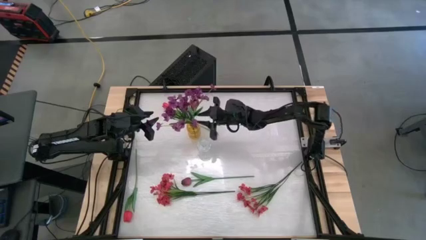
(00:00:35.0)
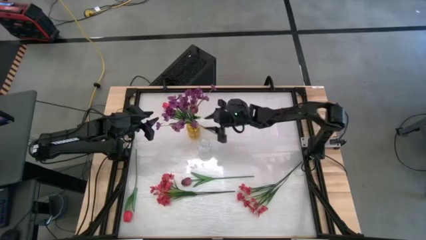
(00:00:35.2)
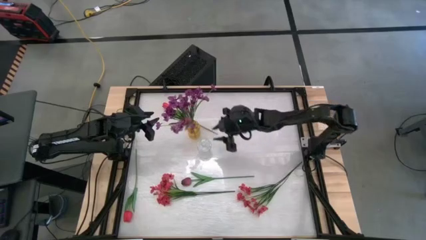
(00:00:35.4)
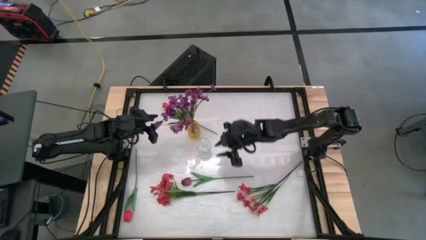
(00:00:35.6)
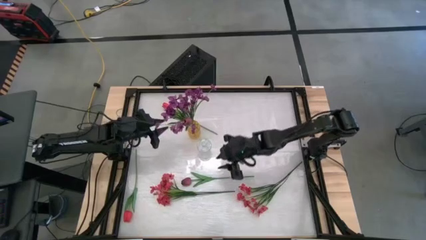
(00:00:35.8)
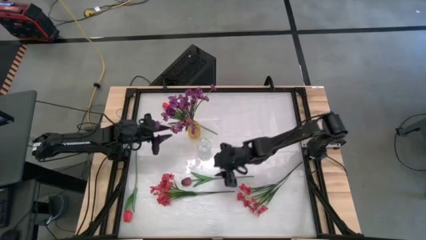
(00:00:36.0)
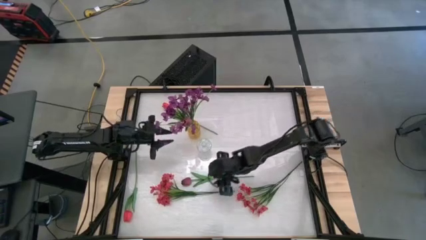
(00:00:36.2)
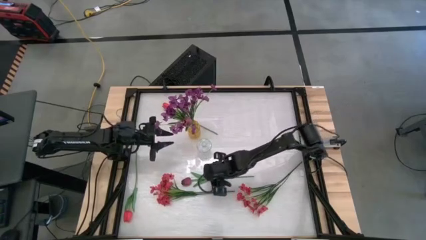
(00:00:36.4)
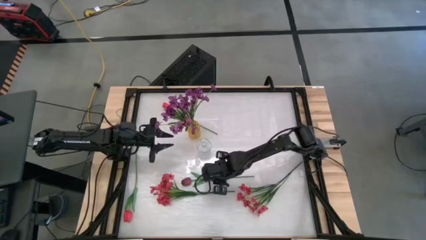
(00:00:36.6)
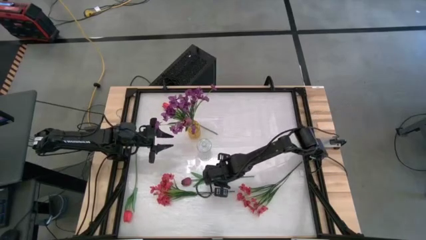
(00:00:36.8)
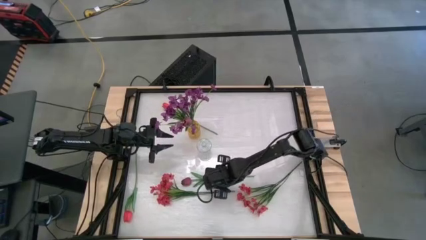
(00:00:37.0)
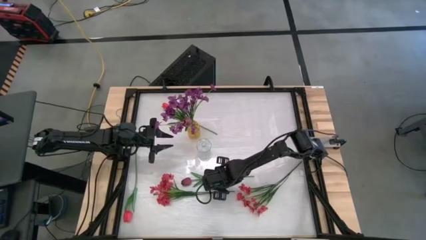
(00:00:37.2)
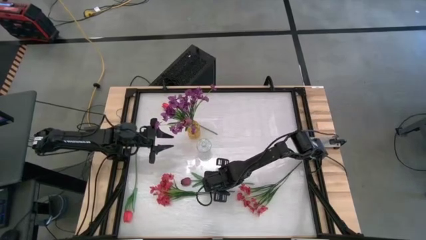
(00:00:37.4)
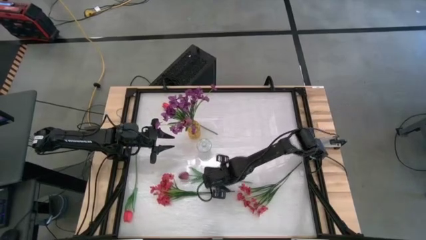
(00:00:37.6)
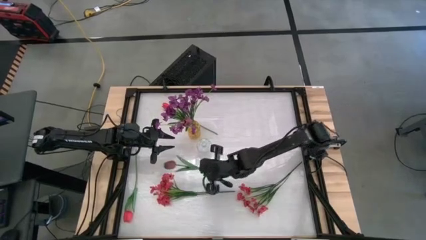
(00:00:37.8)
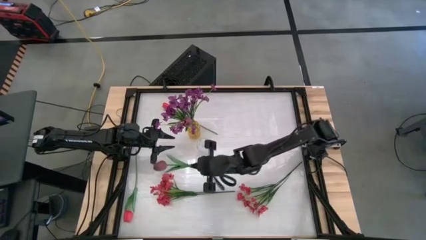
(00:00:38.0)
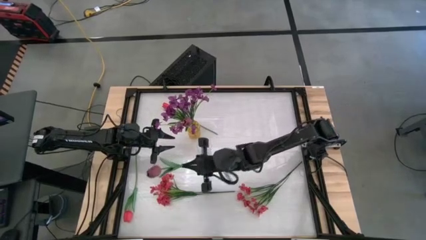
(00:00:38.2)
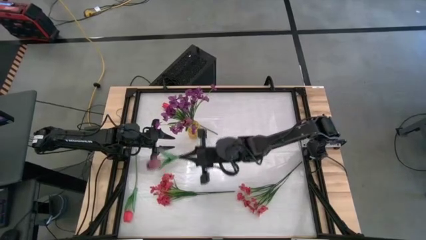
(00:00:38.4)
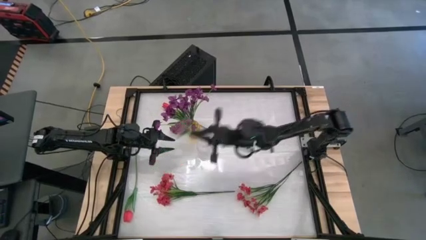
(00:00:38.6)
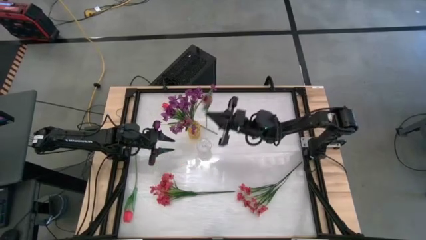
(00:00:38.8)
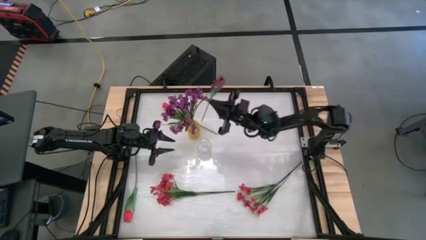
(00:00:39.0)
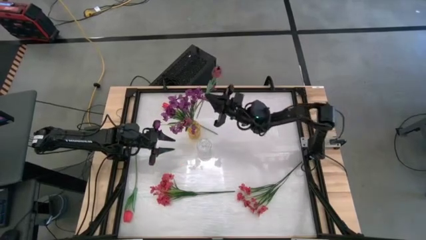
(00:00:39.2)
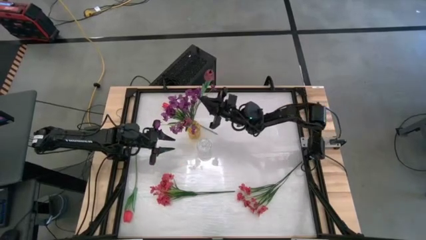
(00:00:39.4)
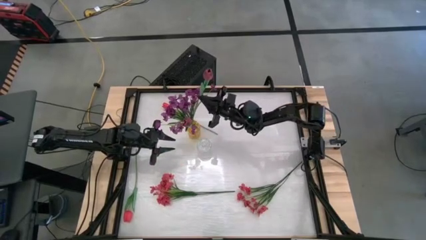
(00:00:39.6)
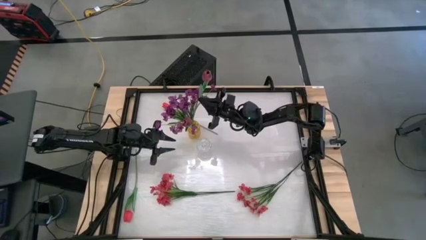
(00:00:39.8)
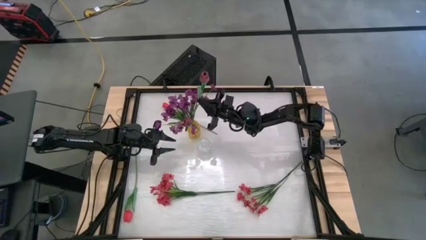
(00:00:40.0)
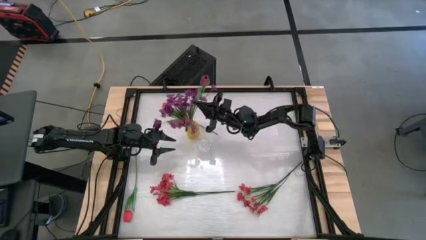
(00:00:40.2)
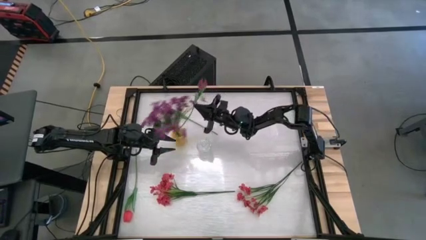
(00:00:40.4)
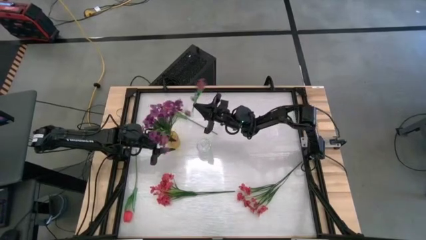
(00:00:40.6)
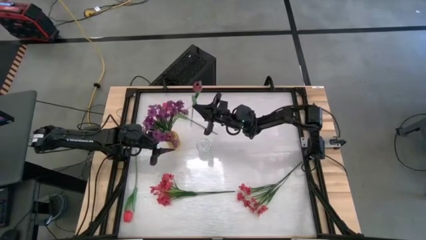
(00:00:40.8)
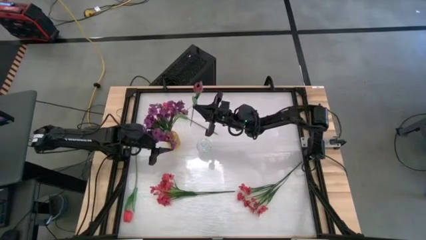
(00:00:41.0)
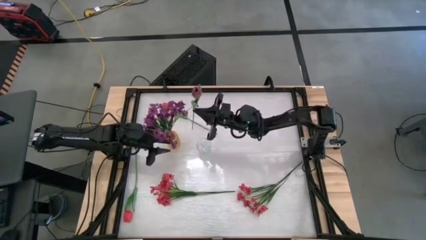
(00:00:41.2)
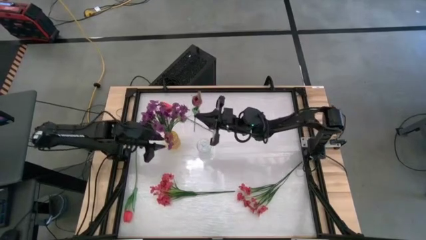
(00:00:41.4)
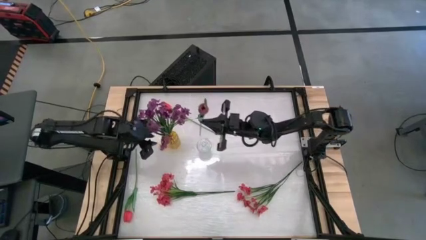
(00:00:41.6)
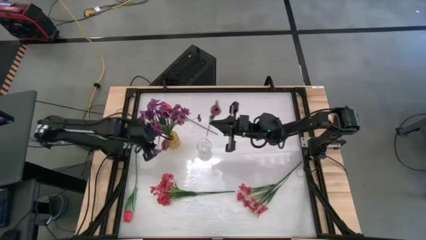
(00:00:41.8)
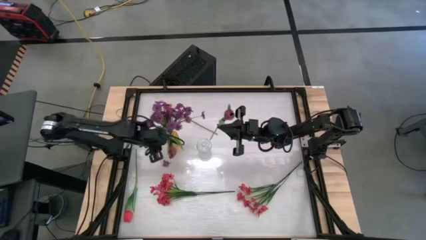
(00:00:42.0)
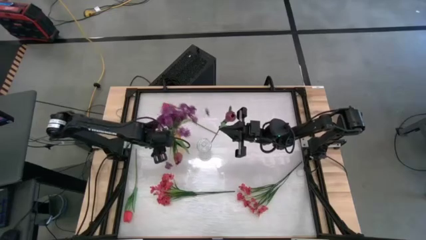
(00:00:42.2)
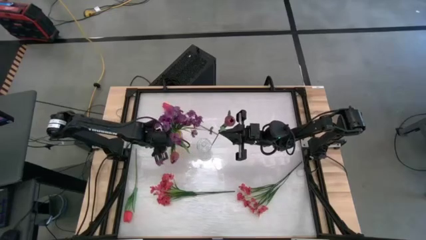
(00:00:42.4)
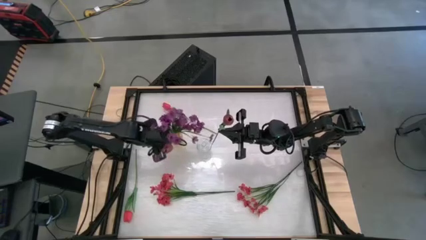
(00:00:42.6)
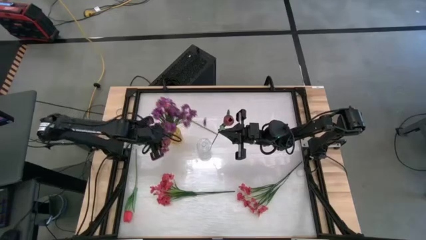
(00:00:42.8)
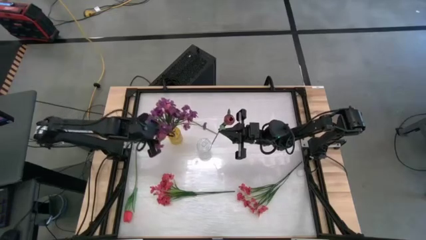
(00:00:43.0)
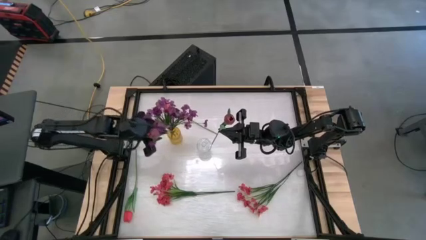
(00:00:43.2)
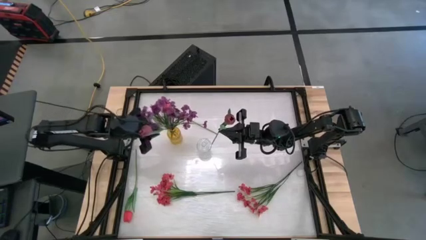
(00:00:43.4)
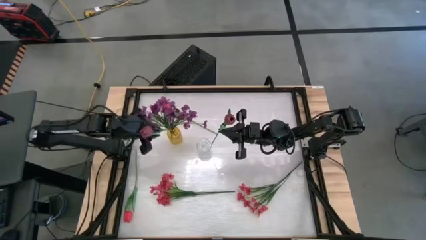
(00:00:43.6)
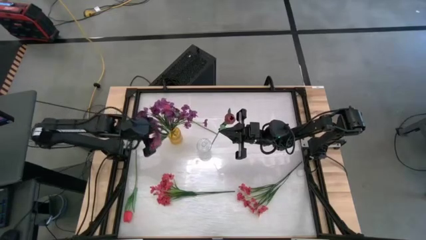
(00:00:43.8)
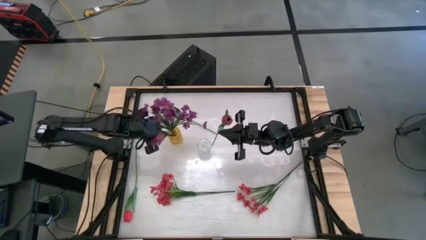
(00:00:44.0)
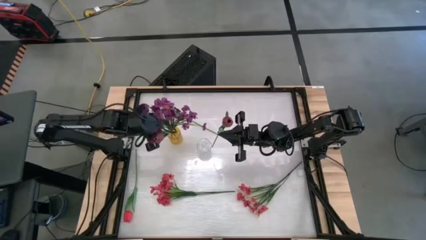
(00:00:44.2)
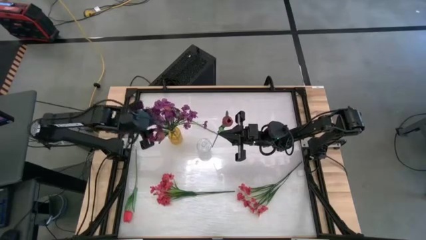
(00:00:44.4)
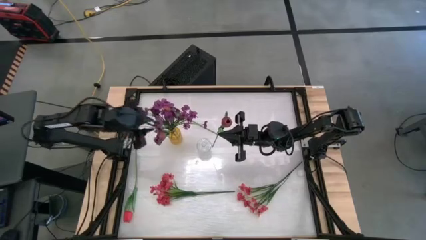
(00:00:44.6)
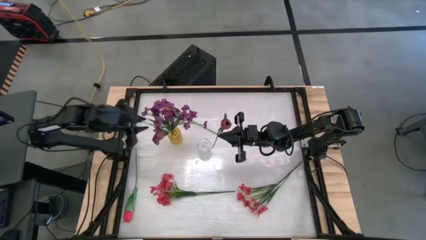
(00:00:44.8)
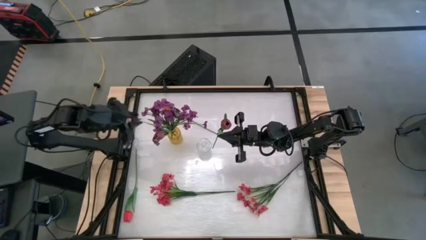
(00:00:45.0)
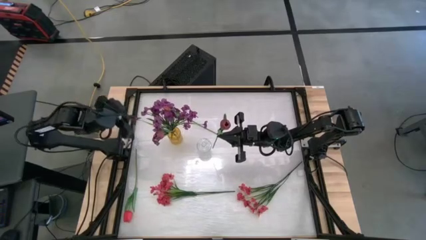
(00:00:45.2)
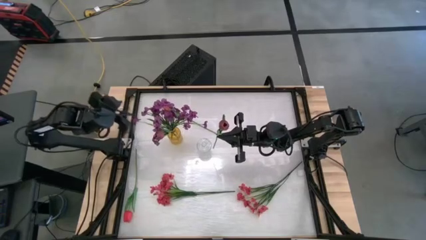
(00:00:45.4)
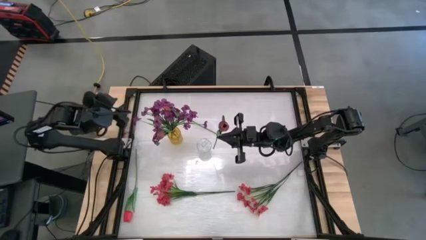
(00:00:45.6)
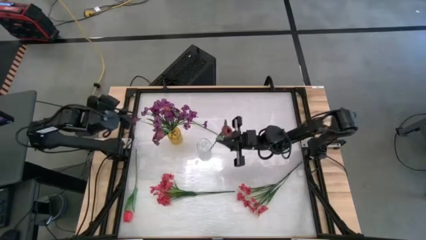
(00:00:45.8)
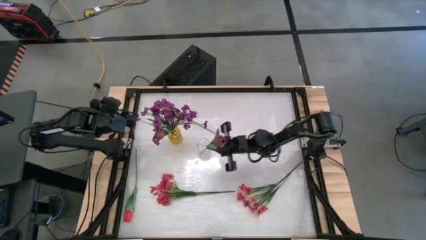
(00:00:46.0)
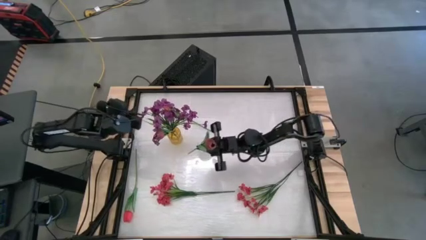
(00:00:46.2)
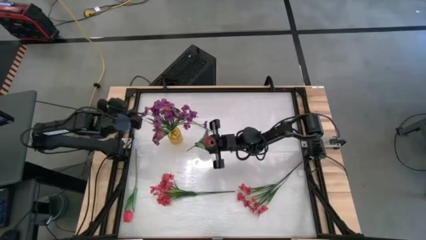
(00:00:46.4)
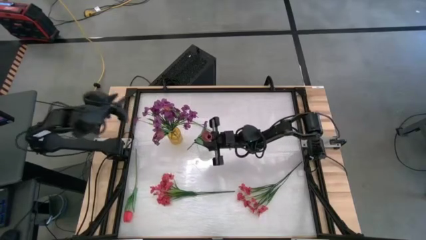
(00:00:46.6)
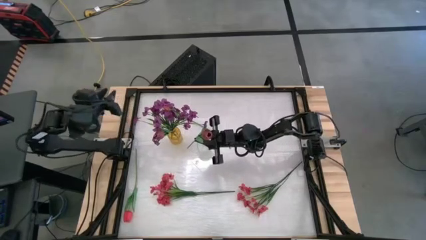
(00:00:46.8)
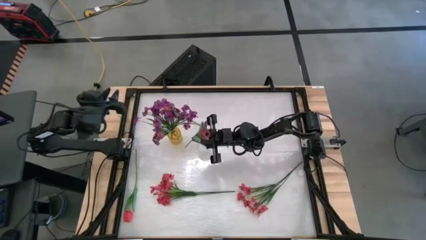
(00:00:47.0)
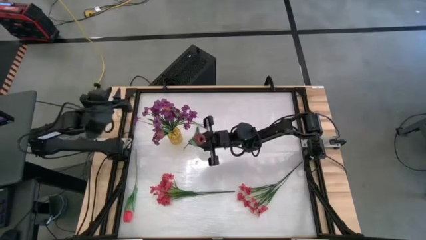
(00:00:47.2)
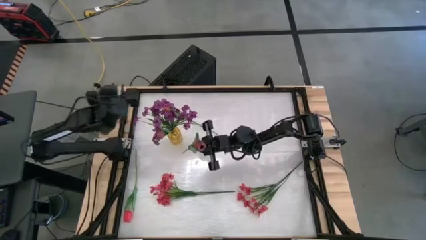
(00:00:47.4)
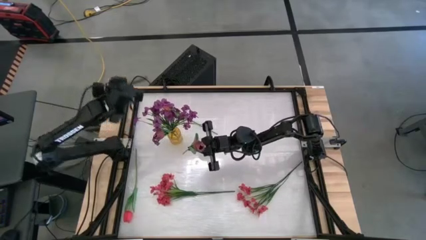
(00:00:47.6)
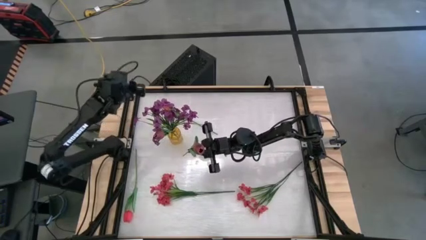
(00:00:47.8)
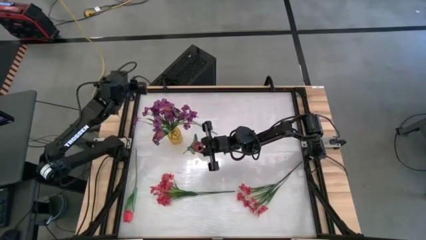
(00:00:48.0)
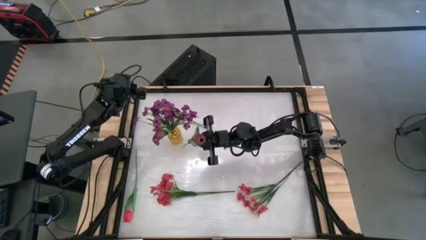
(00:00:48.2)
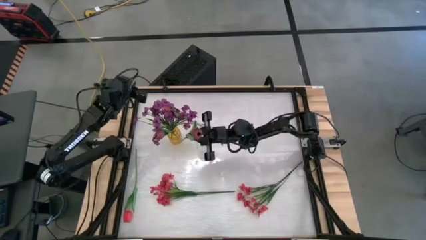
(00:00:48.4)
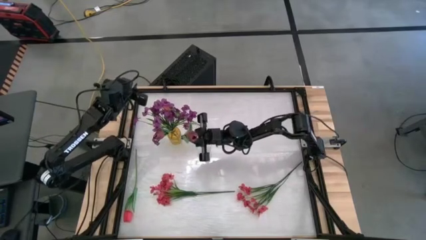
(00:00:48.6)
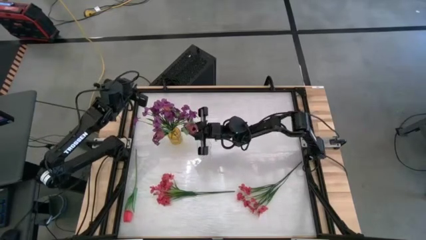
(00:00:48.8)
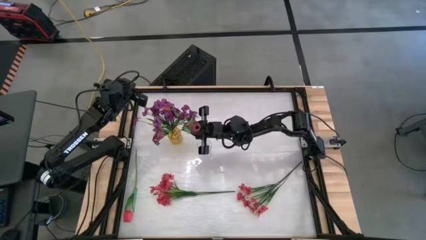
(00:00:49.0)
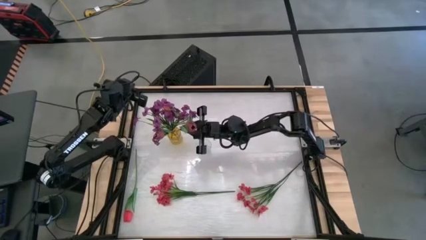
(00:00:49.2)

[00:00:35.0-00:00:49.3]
Task: Sort flowers into vase by color
Put the red flower into the yellow vase
